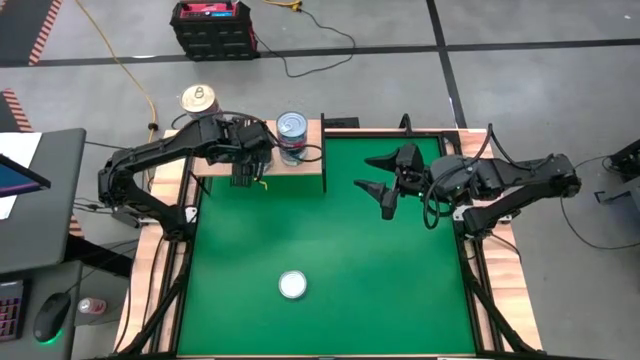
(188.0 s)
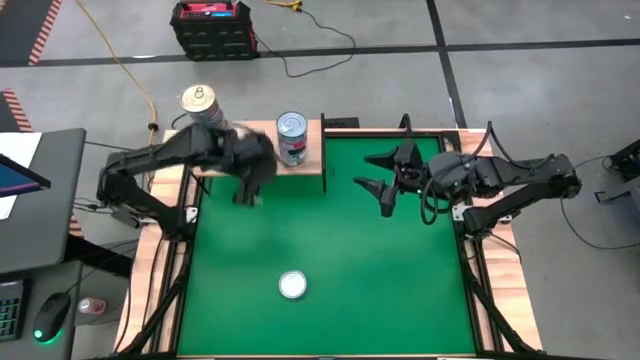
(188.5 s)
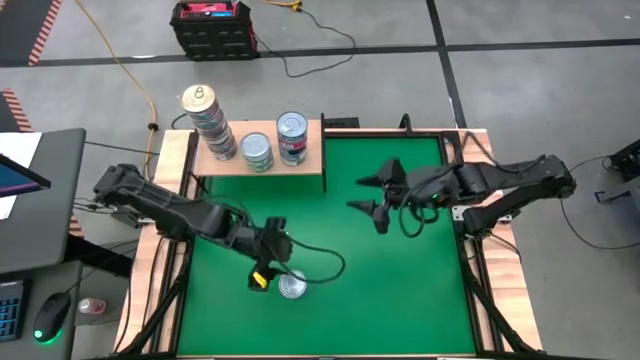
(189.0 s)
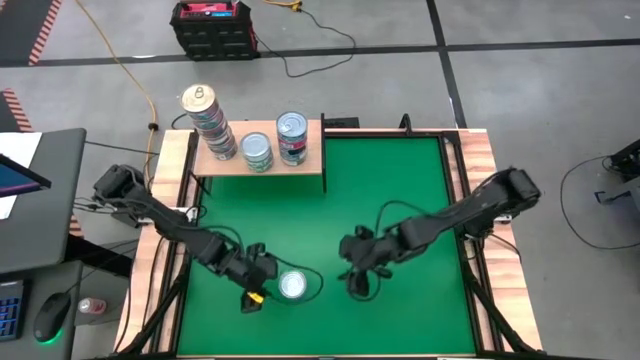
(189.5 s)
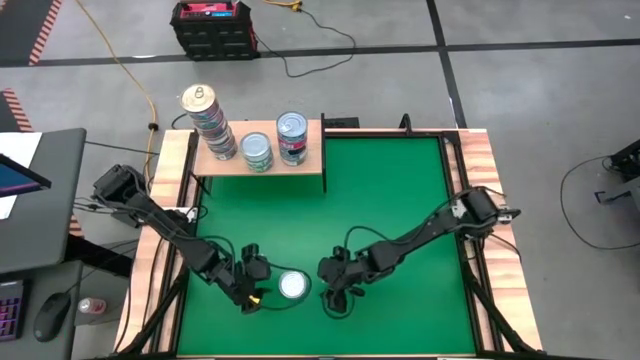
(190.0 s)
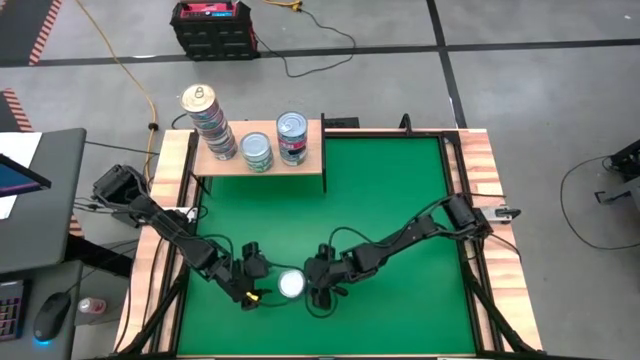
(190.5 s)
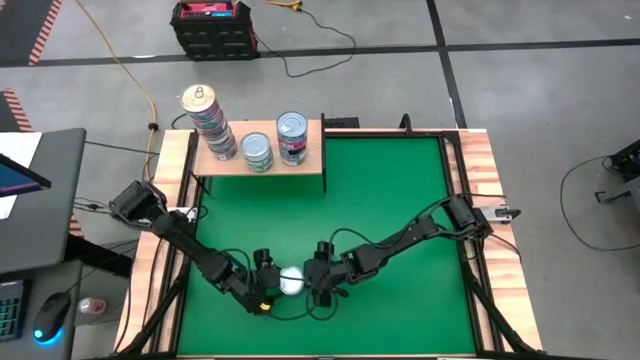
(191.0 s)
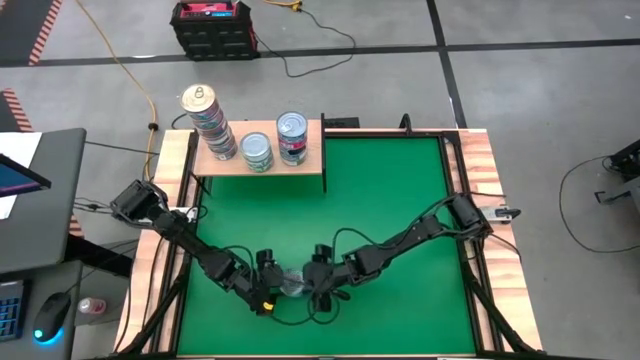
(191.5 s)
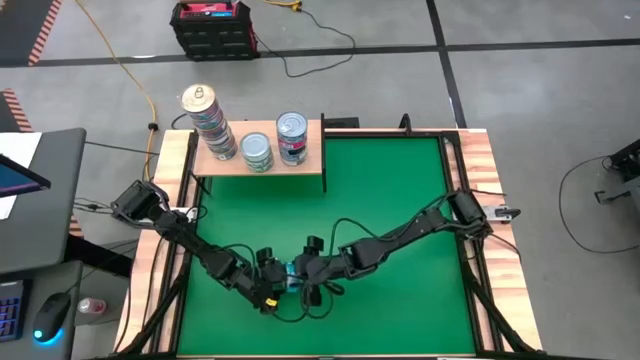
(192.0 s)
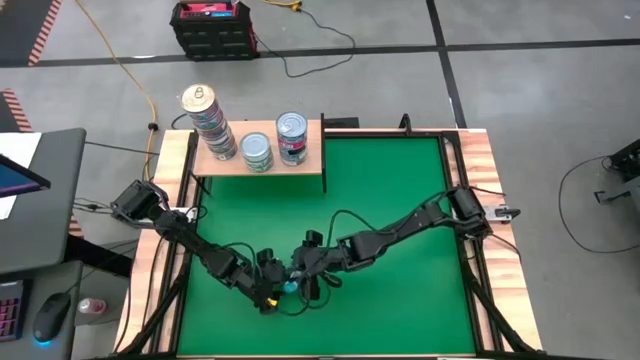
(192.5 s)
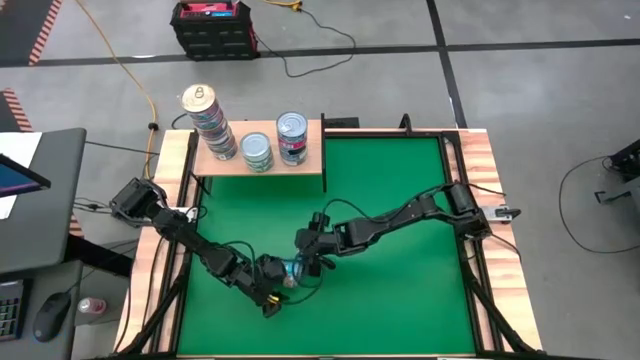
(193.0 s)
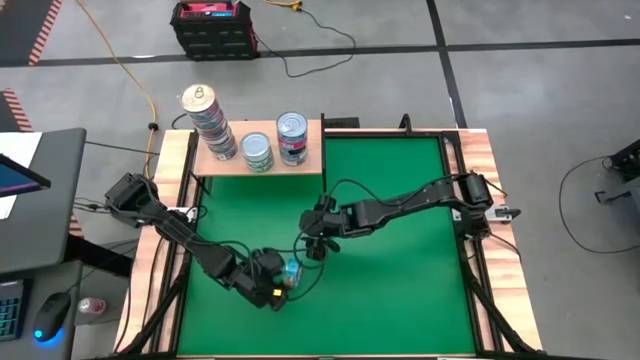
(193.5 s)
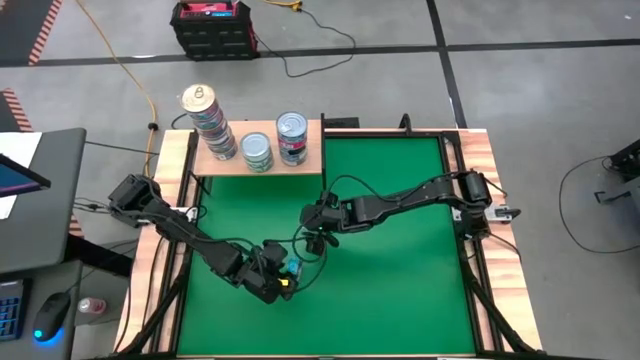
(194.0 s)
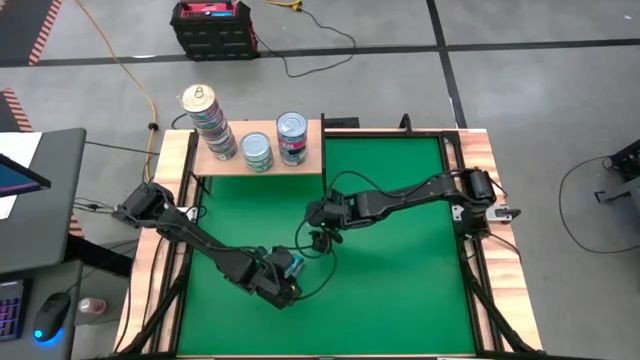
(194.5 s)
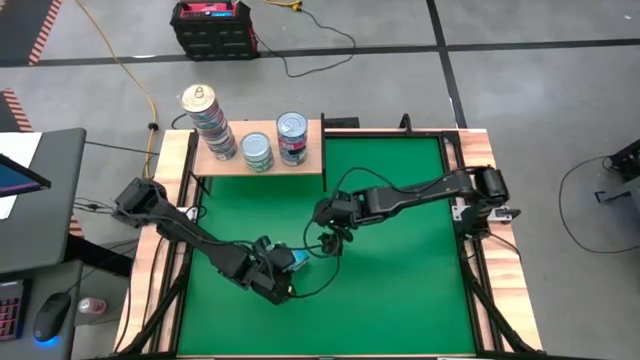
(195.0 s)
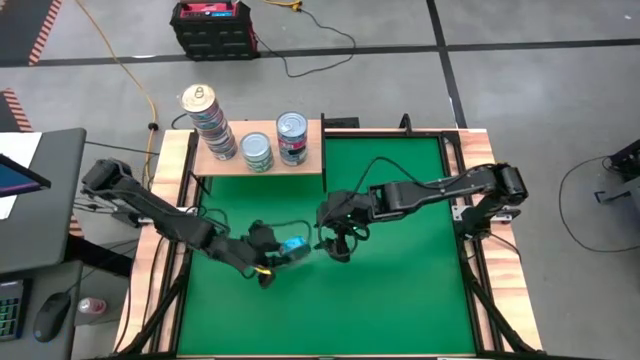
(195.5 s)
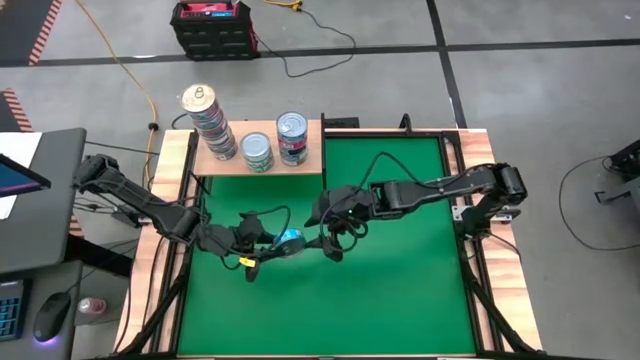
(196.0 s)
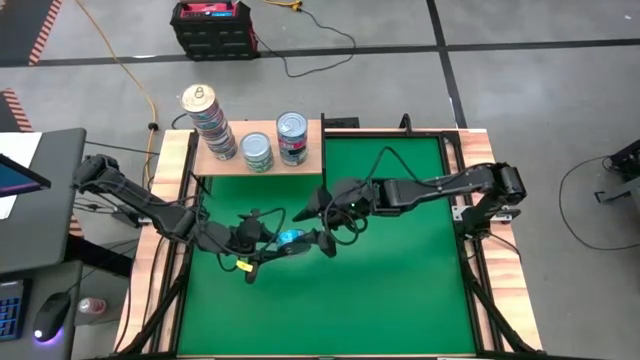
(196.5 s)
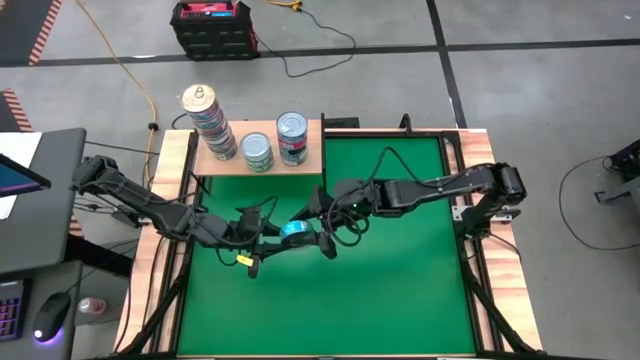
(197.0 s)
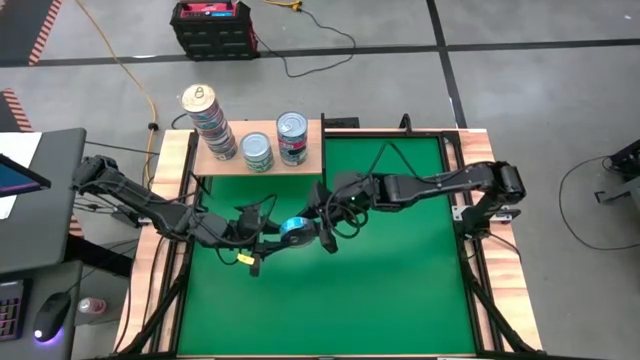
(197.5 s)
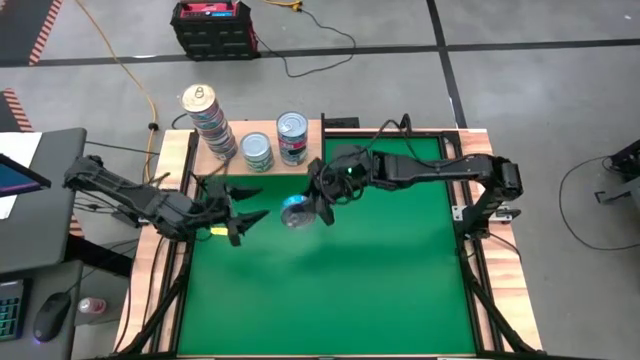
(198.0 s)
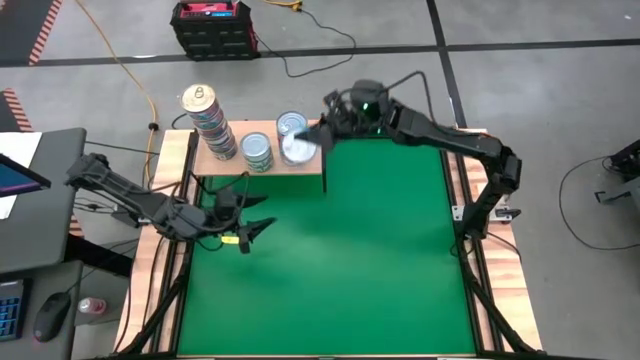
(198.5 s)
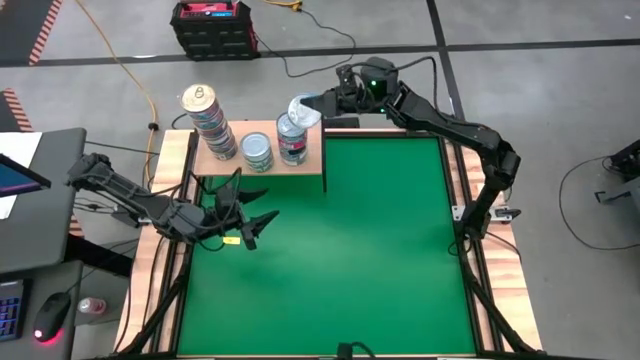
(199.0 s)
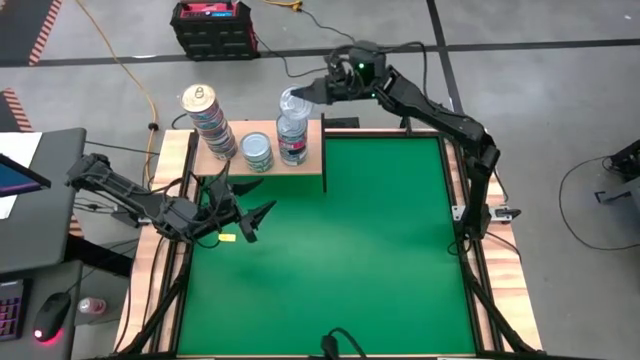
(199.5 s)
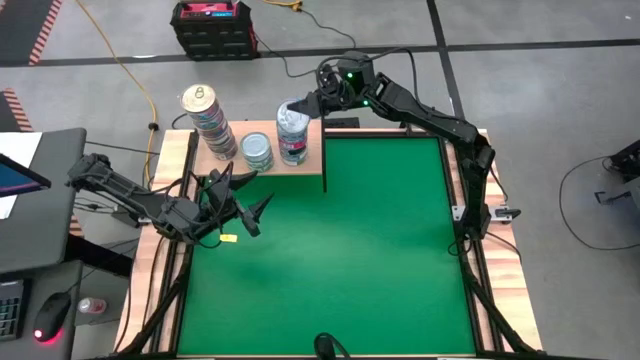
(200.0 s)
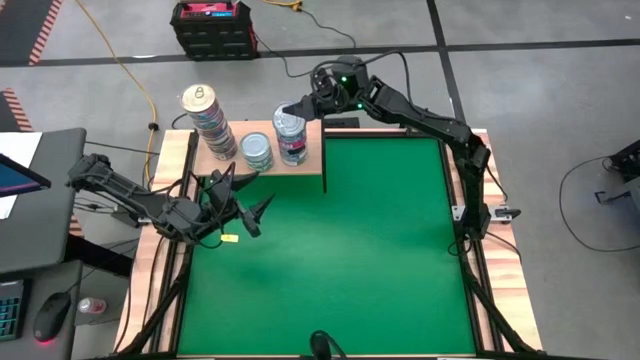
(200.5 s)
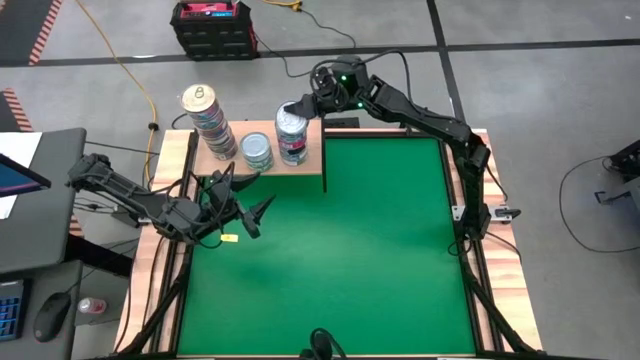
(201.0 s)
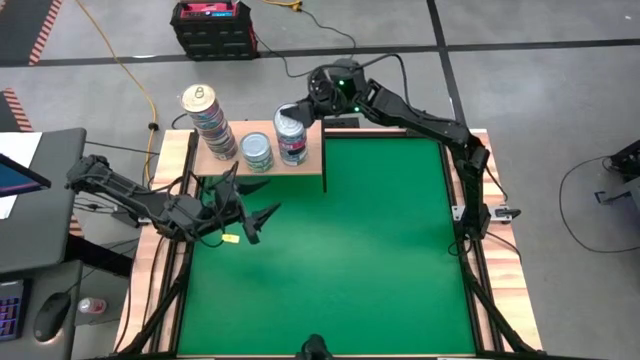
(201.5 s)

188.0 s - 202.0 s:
Task: Stack canned seafood by type on shelf
Stack the light blue tuna can on top of the dark blue tuna can on the shelf

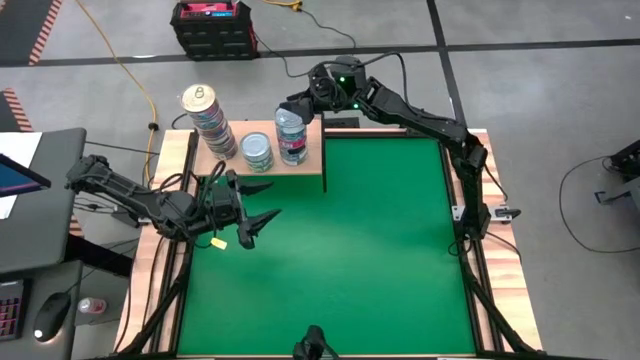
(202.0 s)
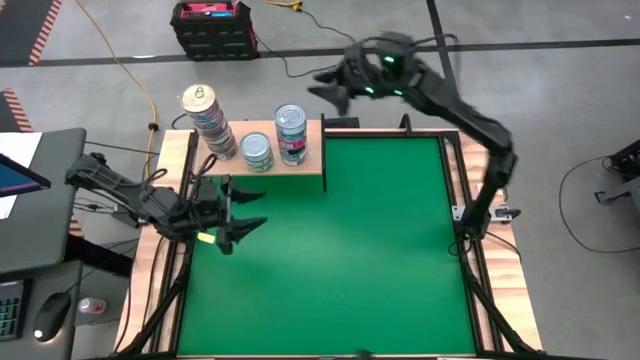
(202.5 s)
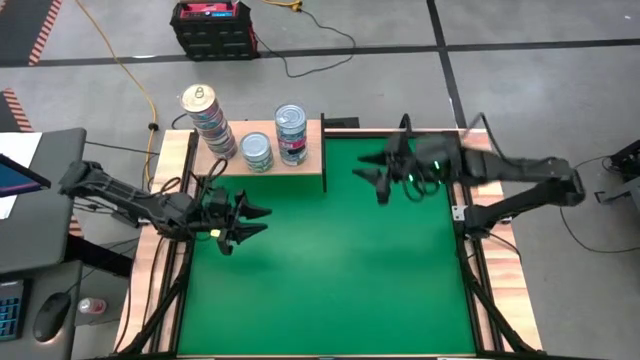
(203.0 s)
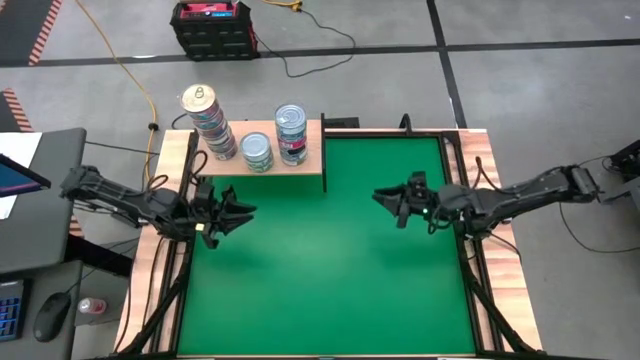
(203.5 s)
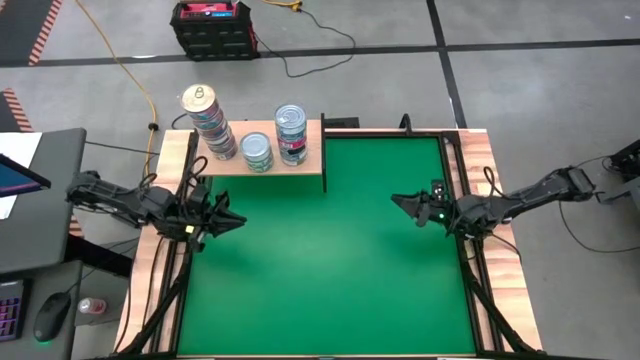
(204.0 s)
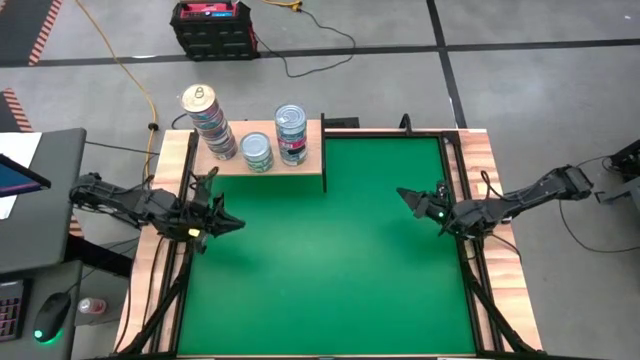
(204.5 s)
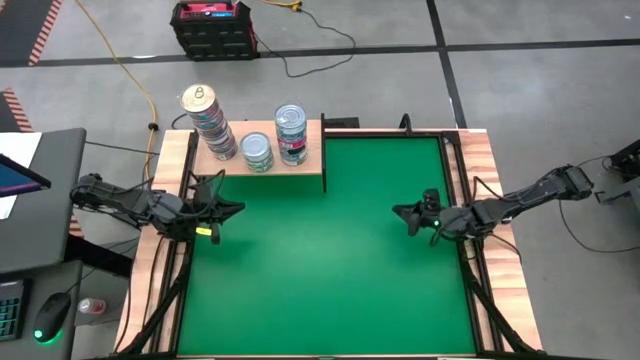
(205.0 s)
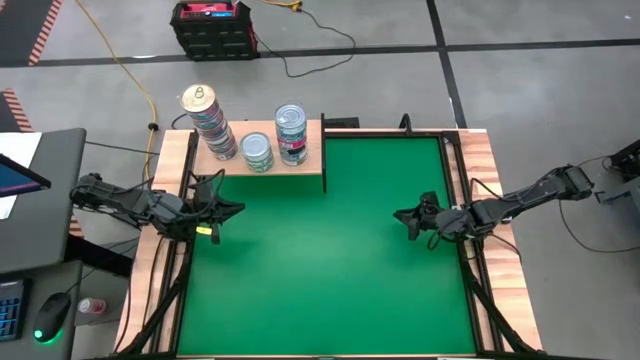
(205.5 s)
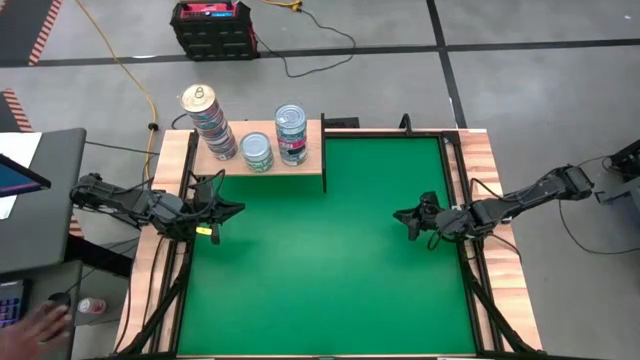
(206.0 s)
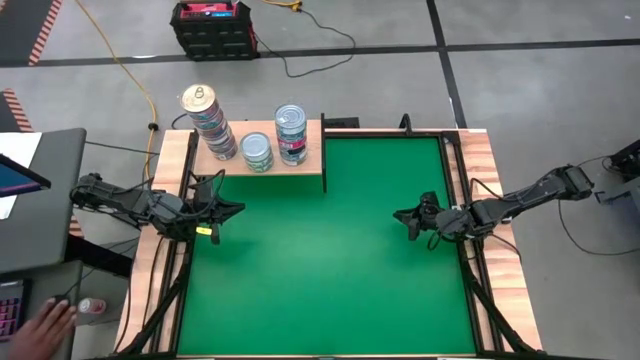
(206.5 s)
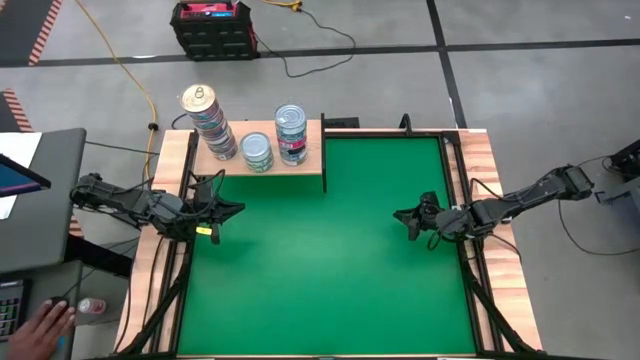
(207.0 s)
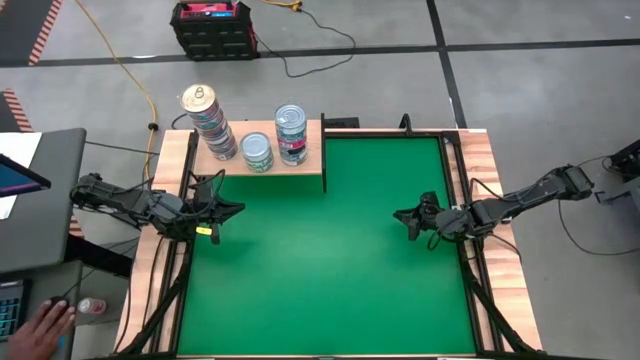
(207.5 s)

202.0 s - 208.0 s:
Return to Home Position
